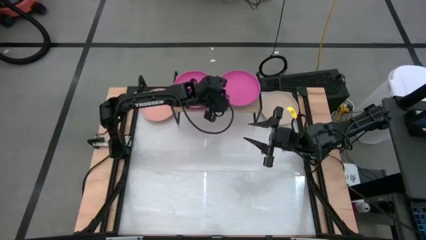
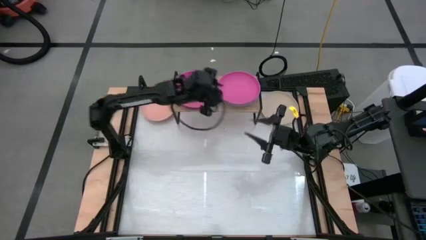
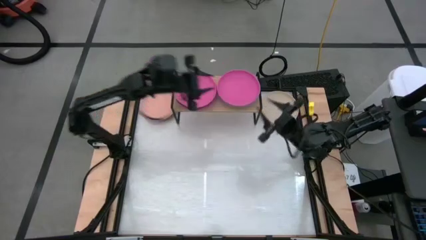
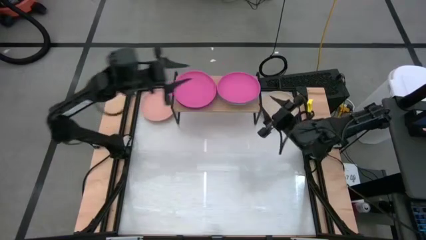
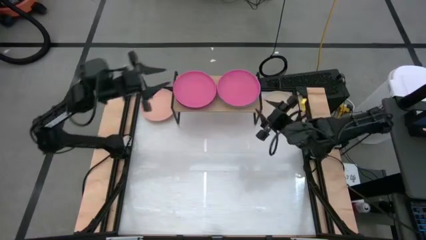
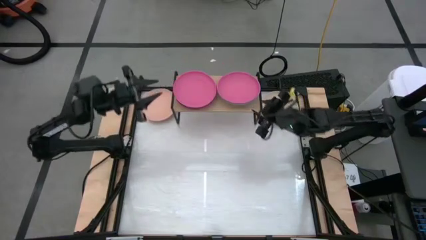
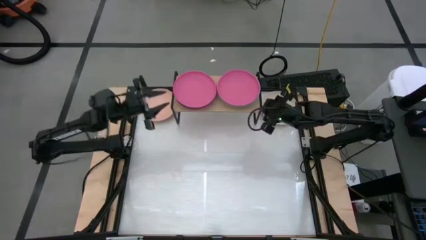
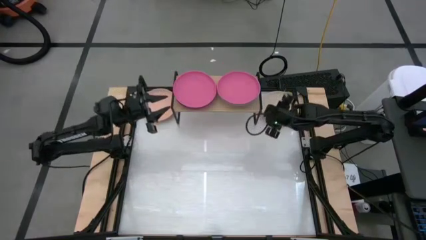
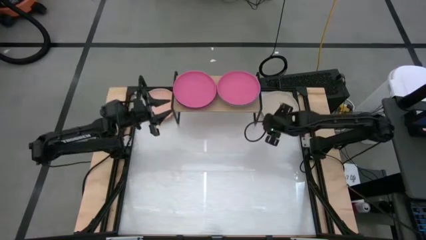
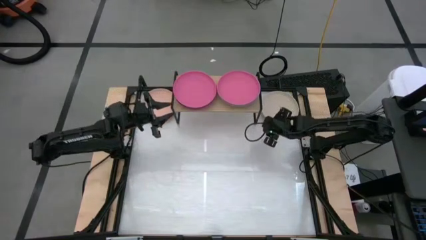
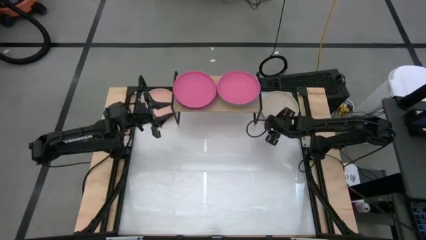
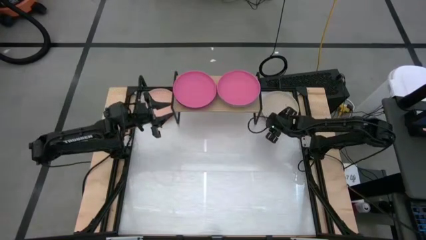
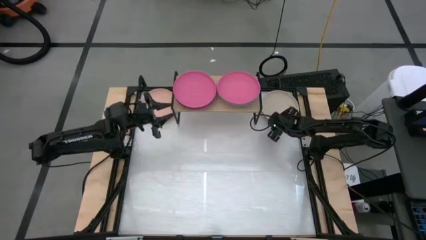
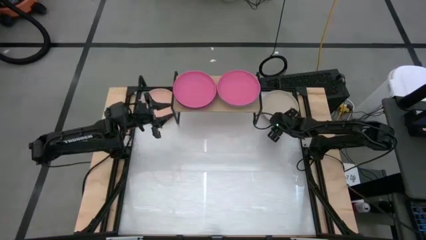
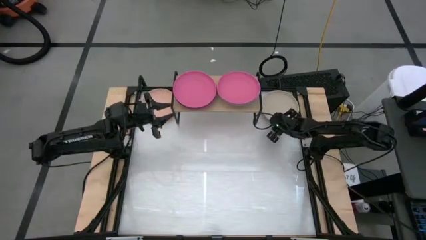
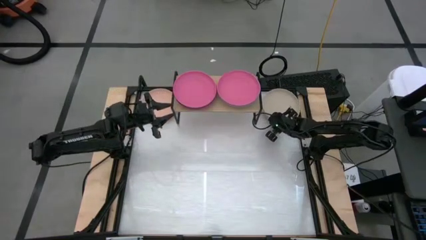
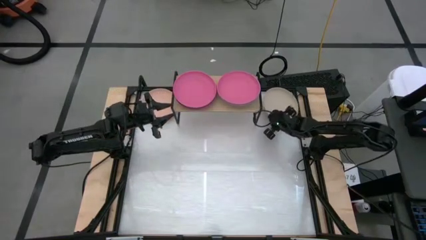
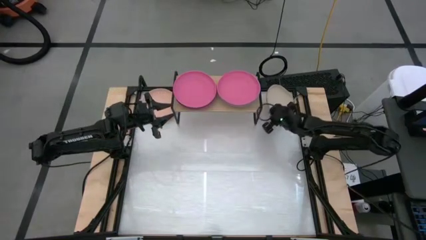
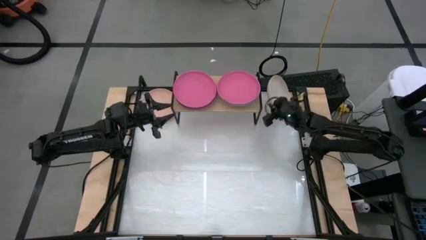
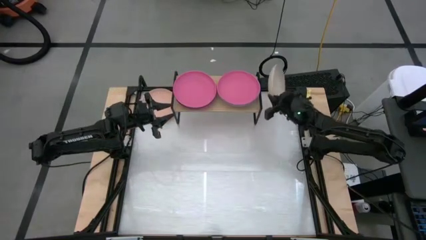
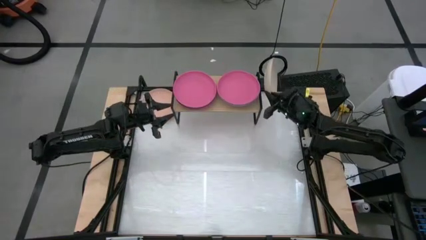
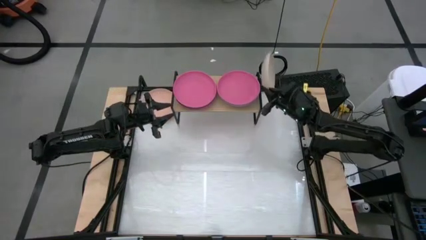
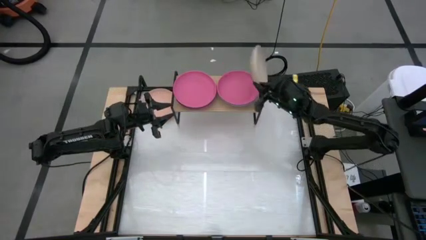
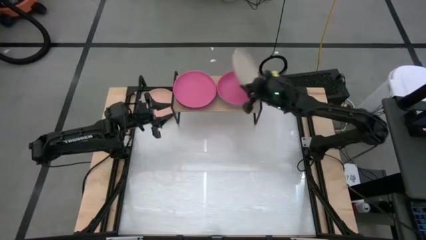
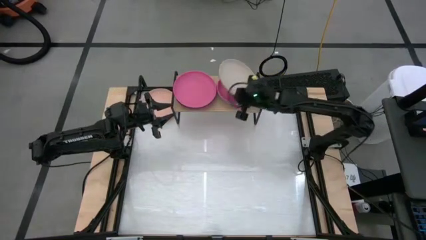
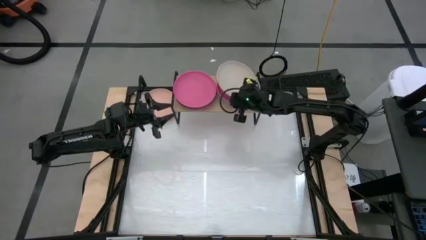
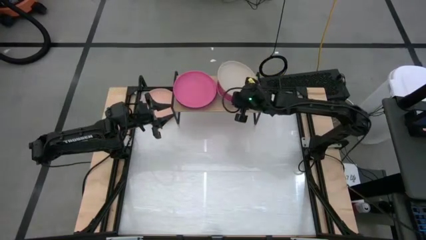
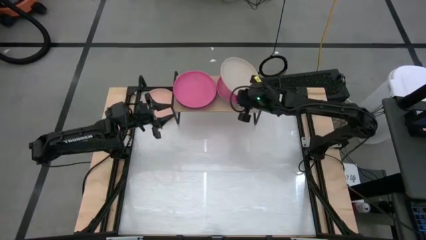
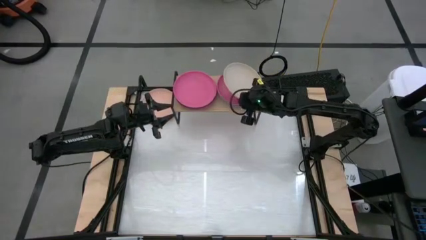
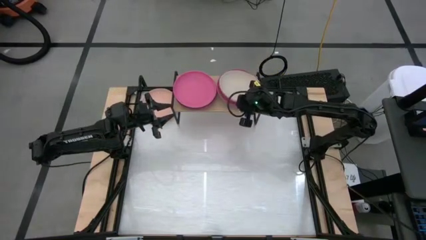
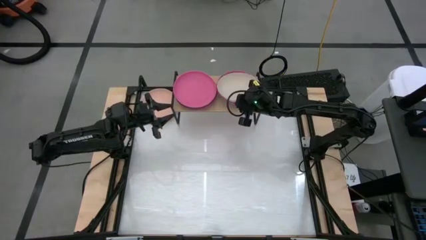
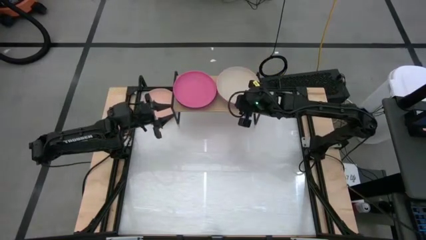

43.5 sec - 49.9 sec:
Task: Place and stack plates onto a shelf
Stack the gray plate on top of the right pink plate on the shelf

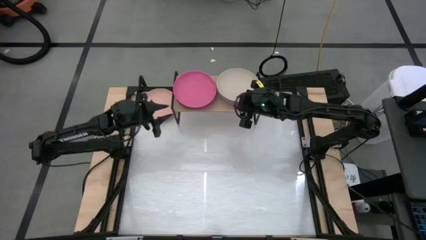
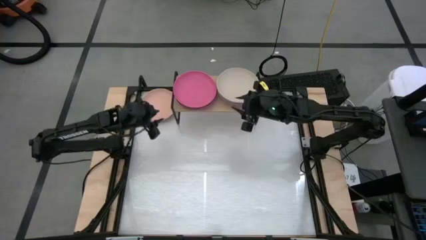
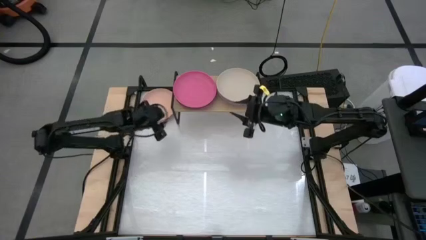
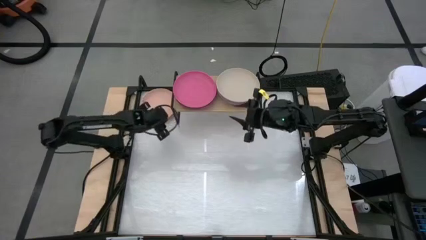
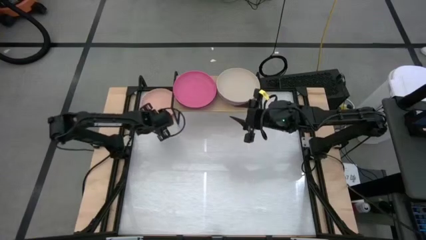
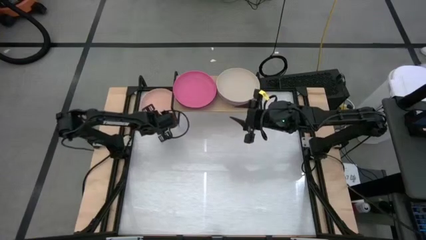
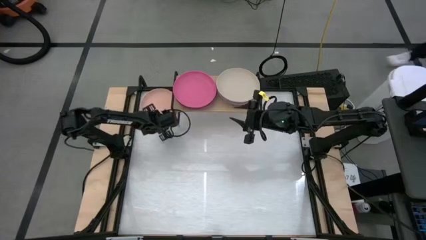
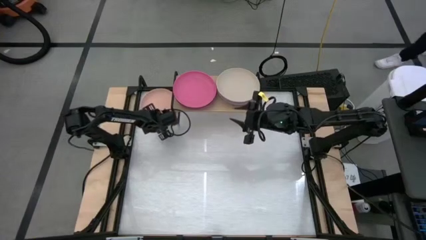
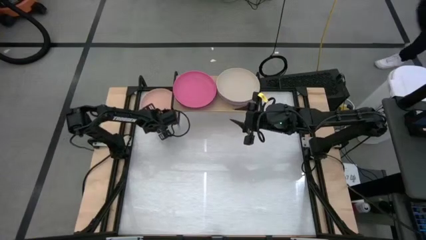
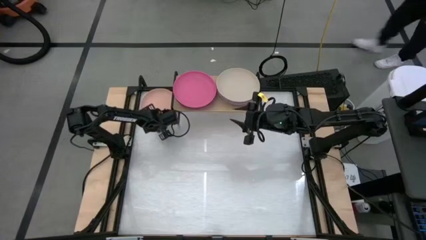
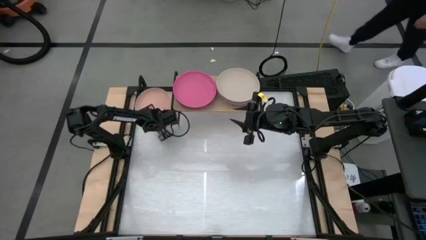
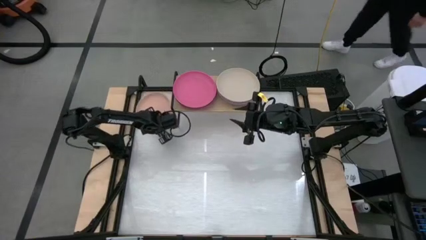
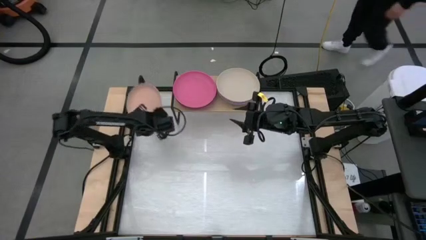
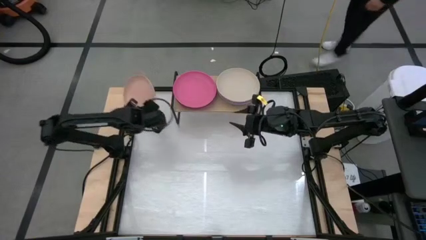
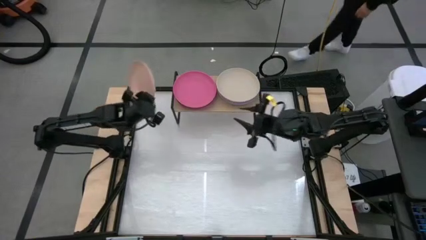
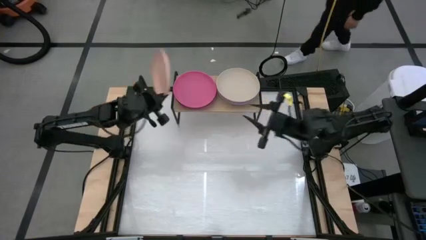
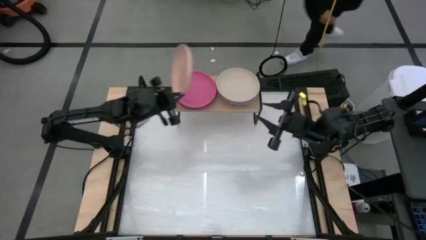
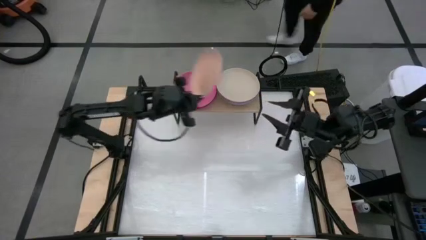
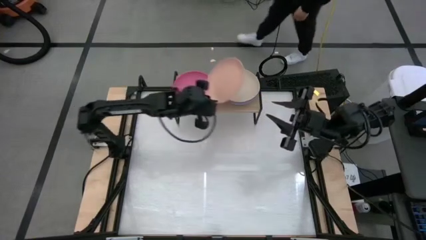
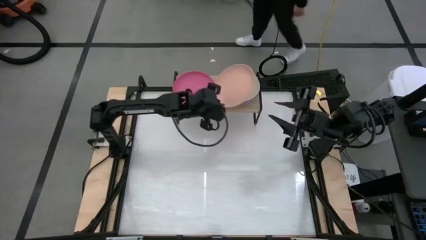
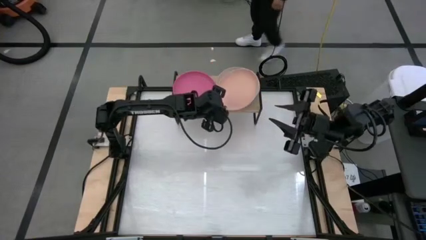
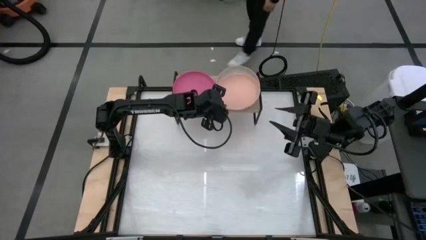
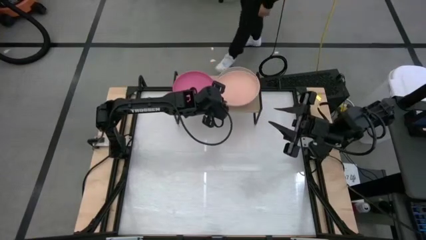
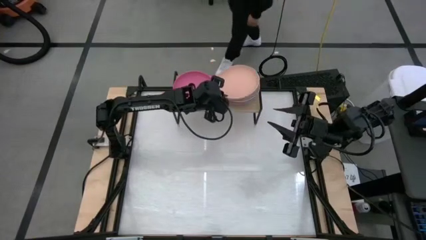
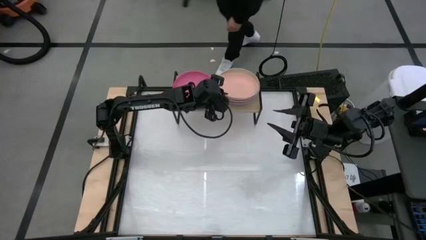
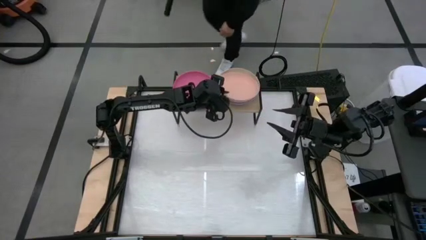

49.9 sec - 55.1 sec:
Stack the light orange plate on top of the gray plate on the shelf

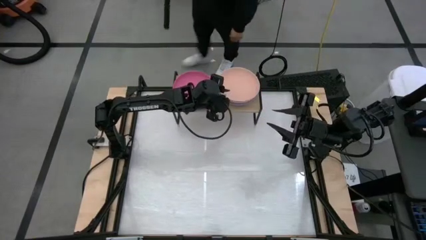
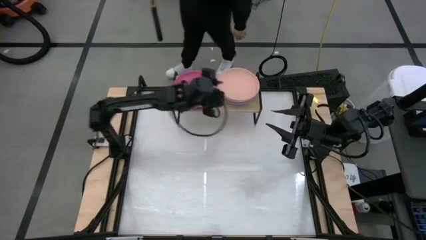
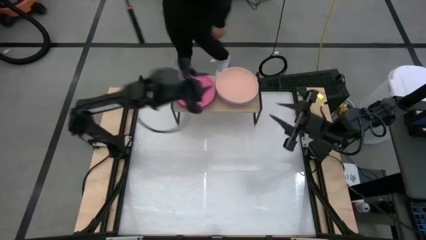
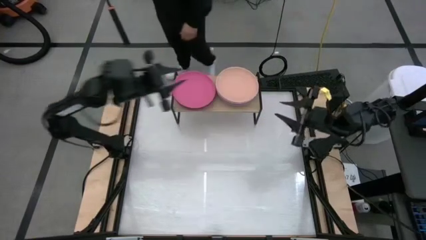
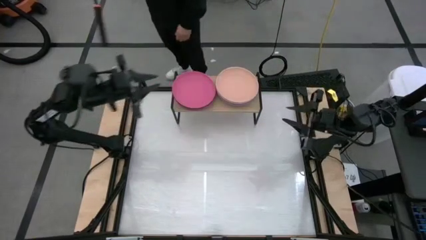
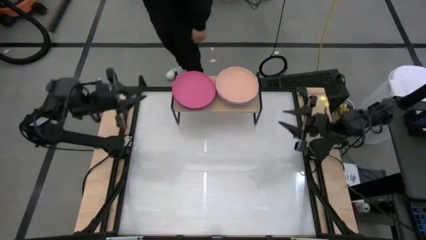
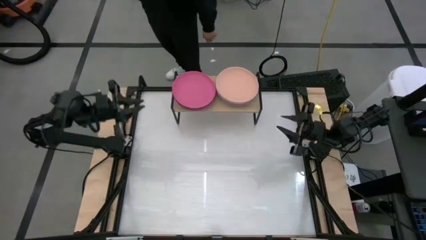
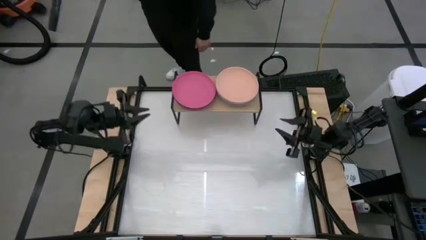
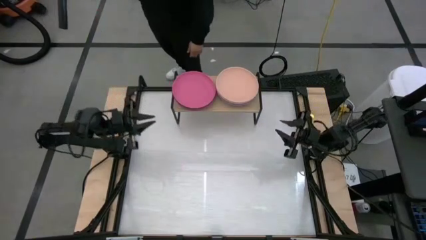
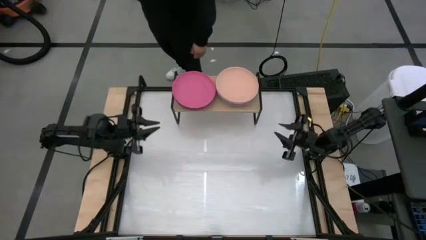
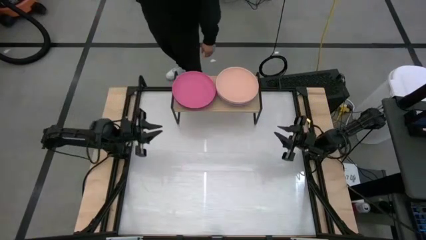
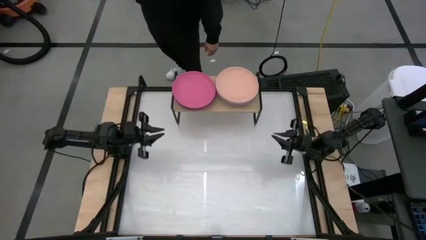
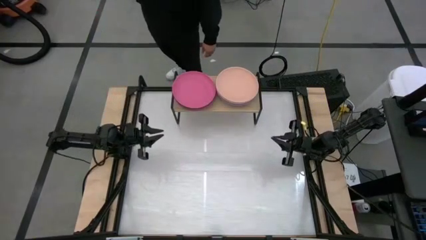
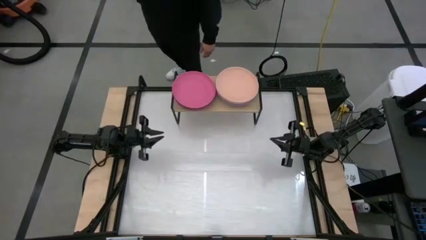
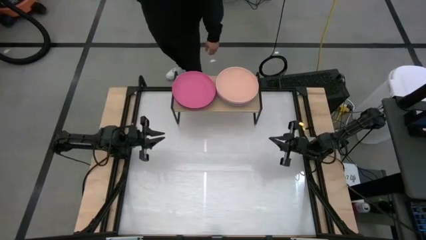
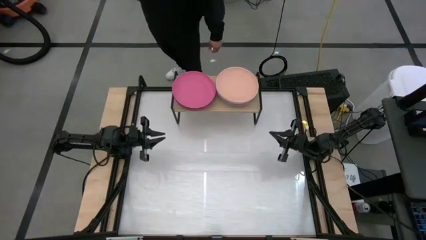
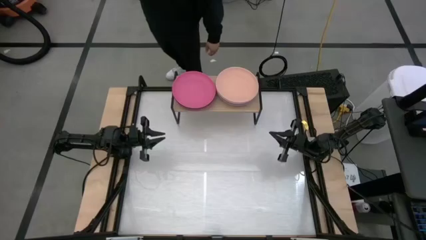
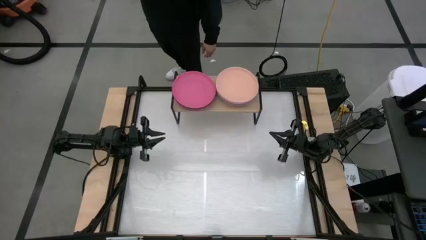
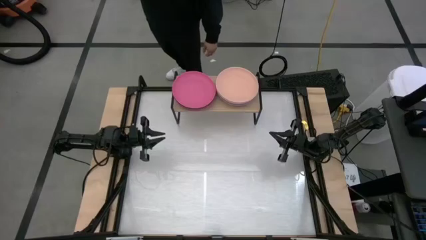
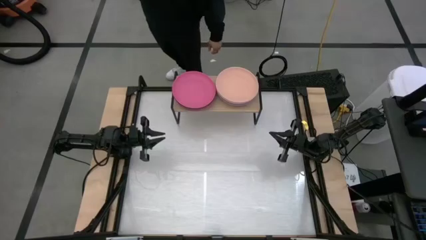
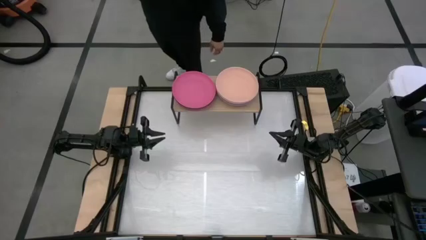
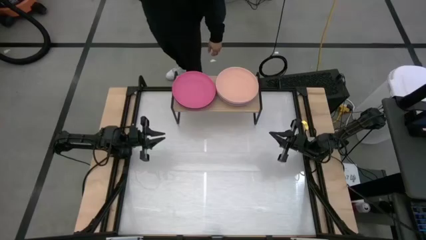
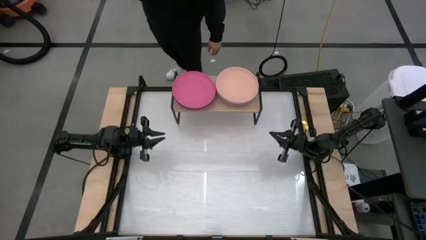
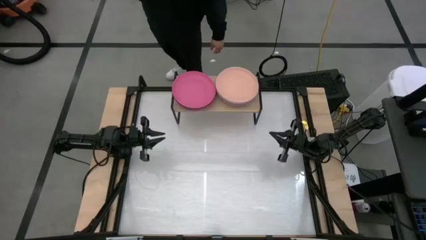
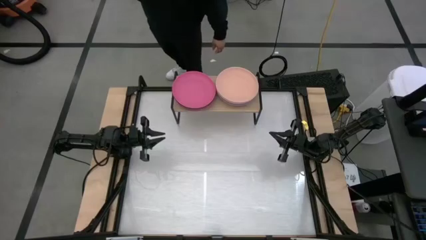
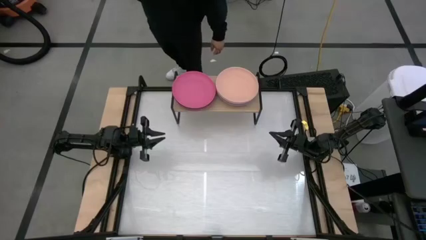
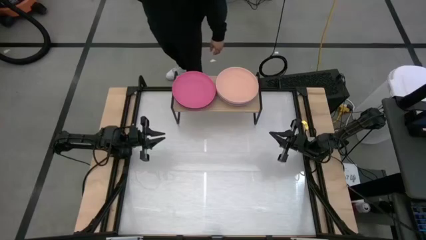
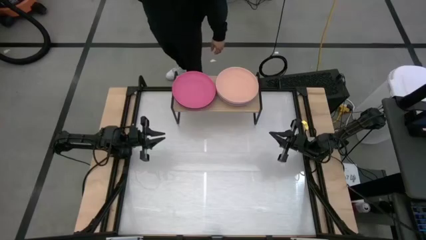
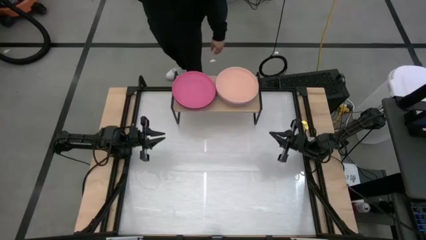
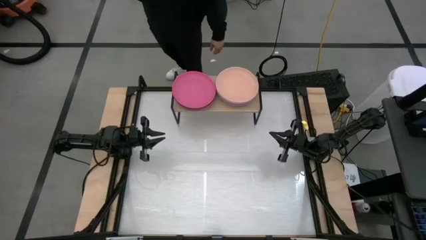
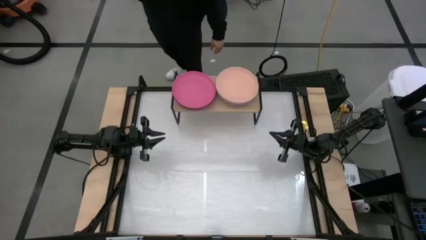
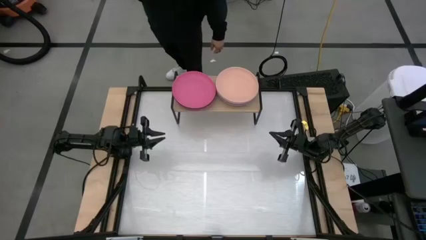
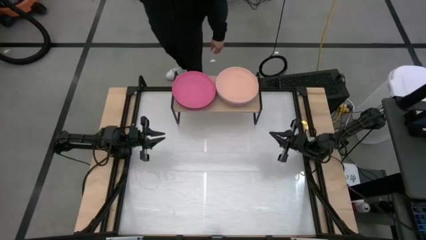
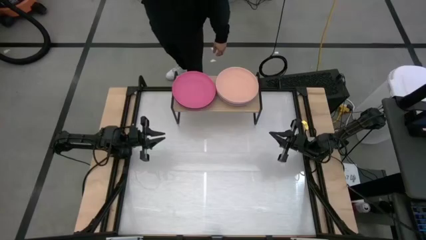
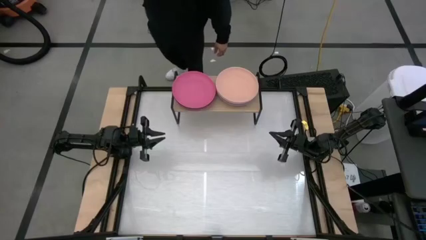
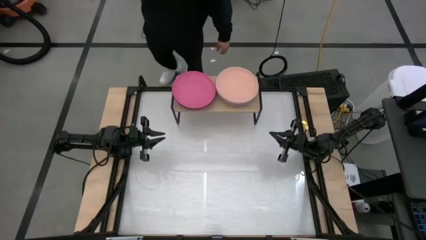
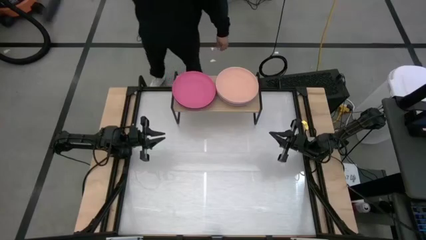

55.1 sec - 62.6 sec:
Return to Home Position
